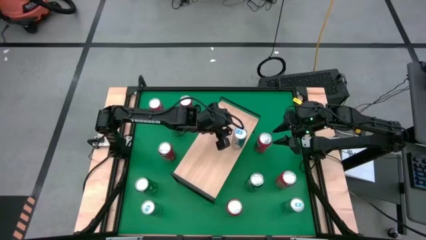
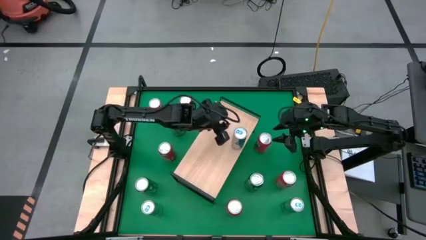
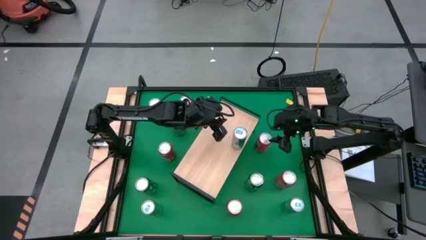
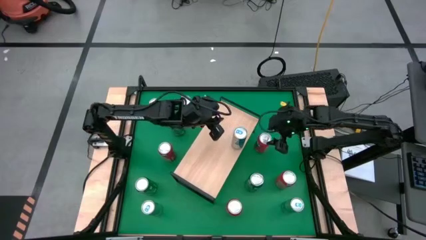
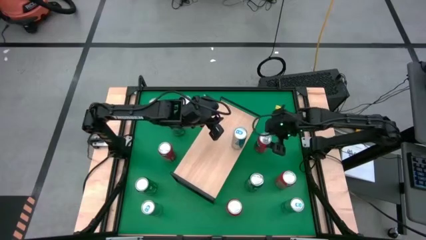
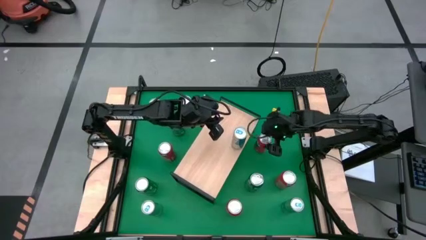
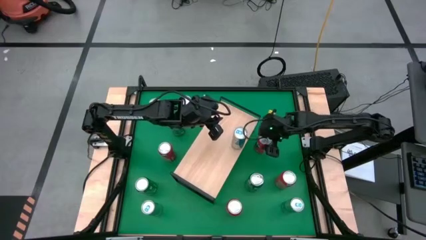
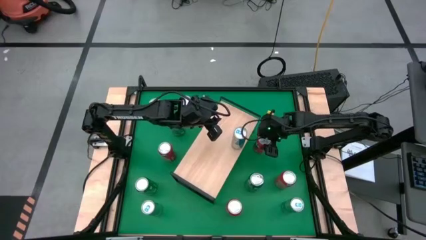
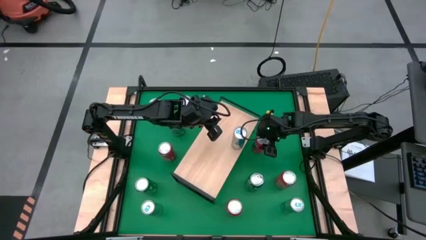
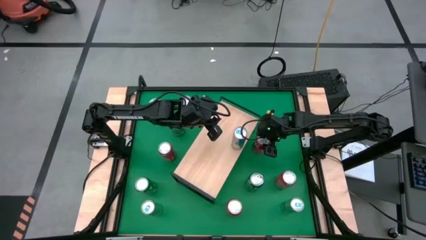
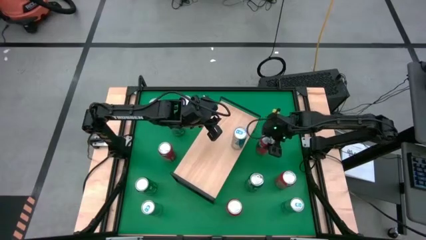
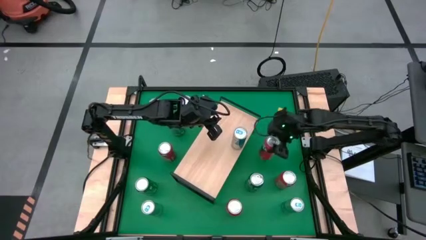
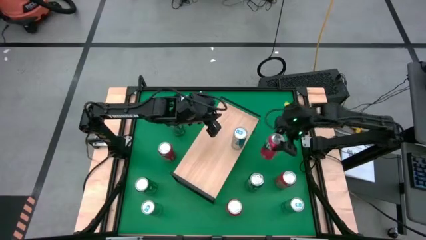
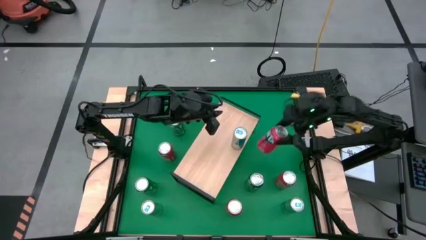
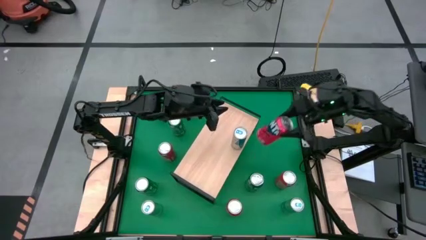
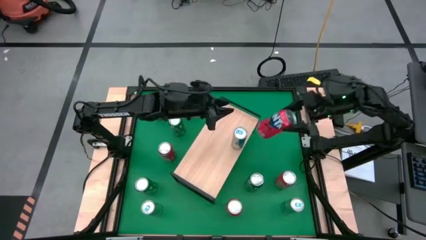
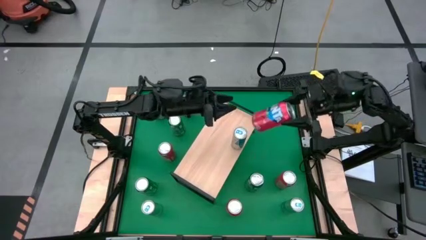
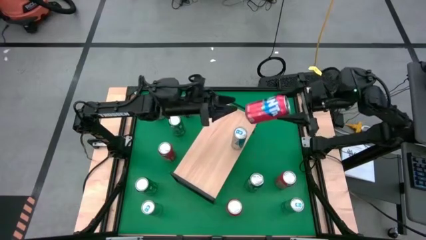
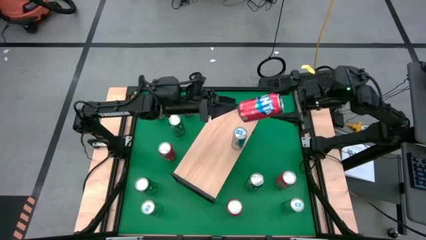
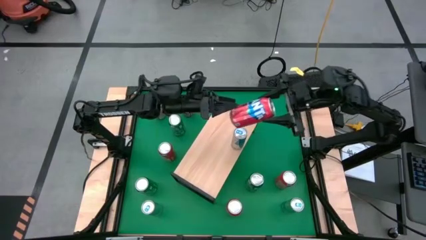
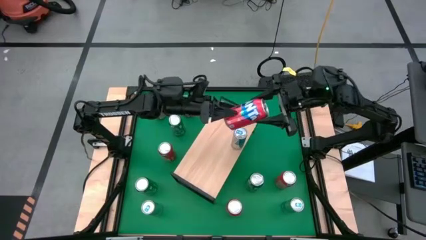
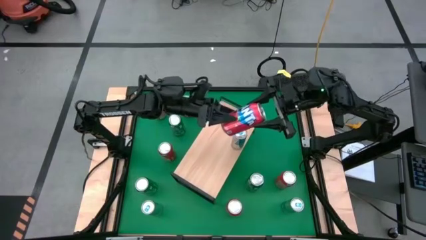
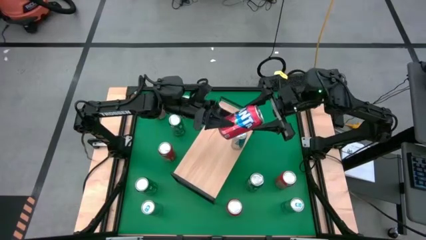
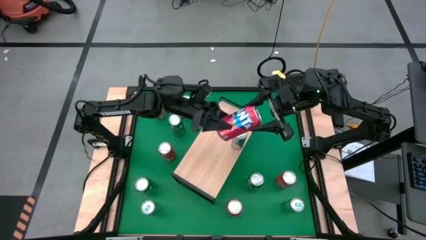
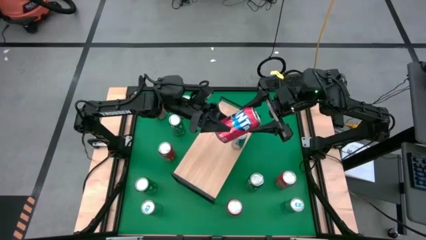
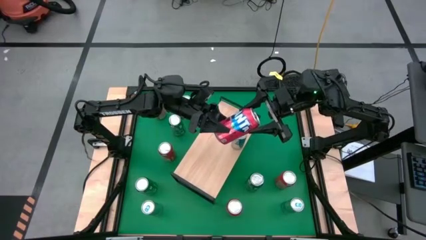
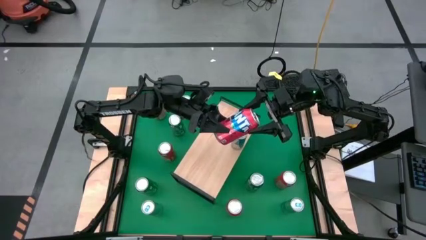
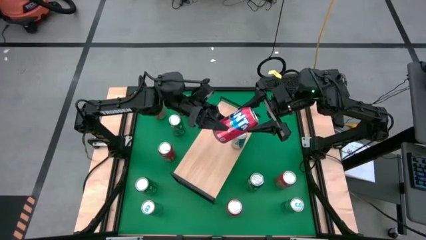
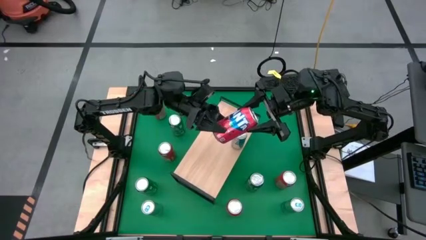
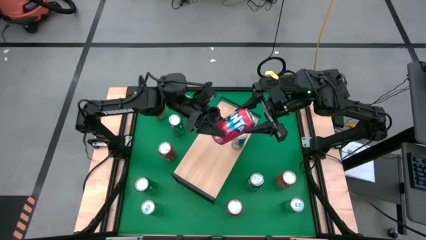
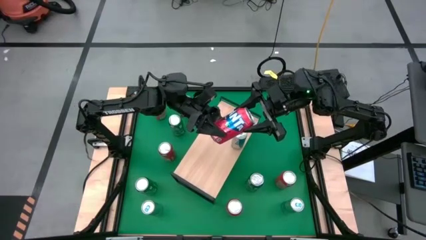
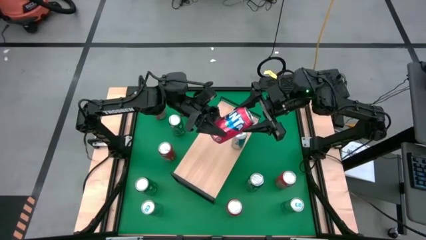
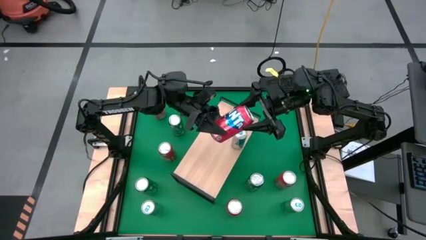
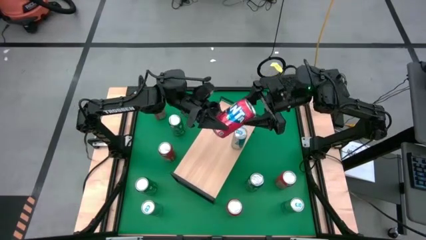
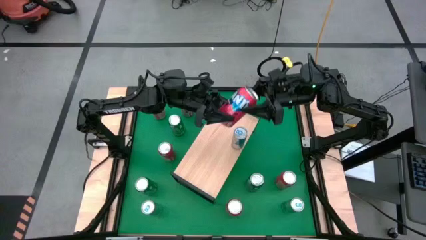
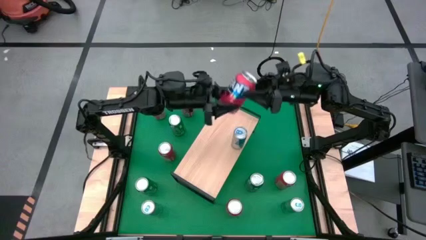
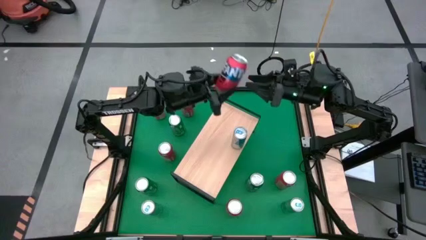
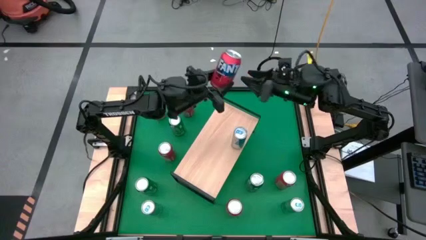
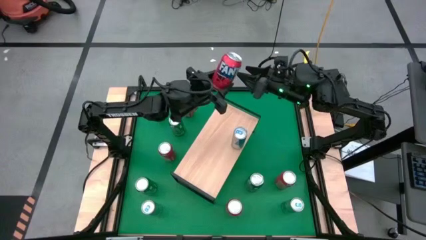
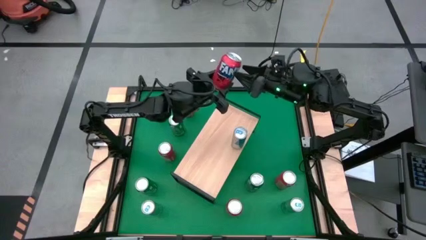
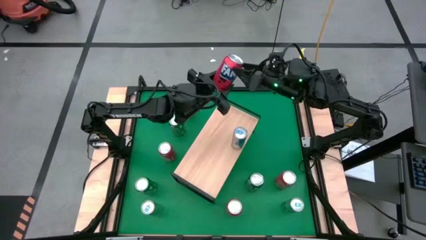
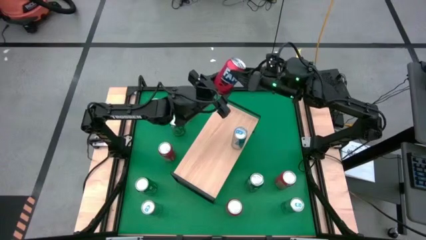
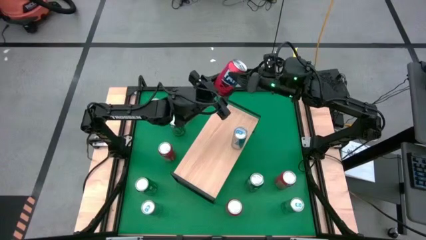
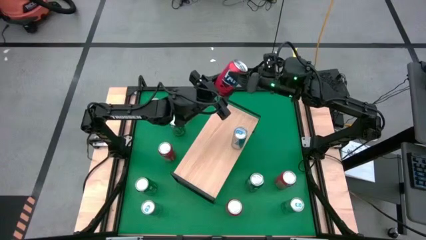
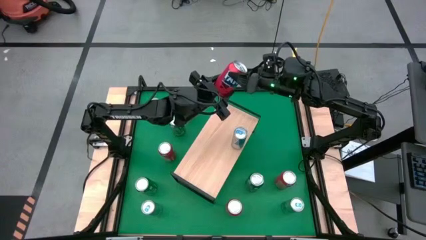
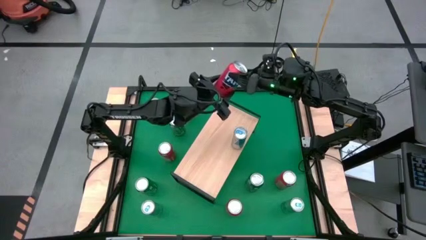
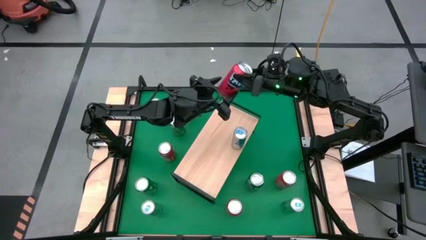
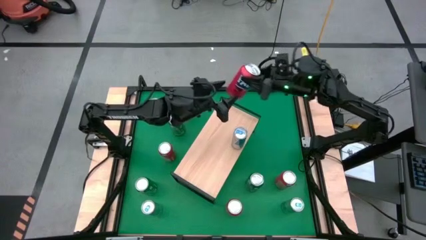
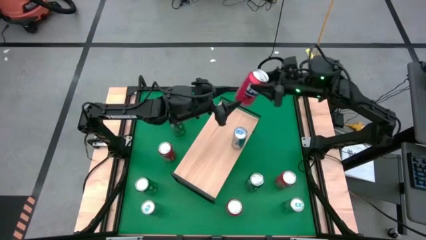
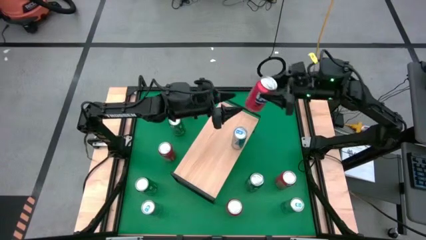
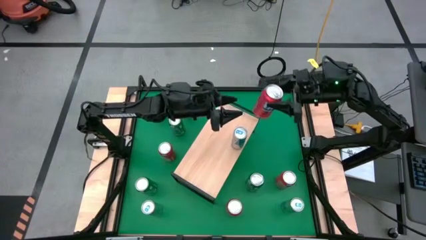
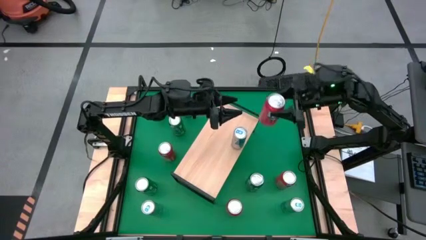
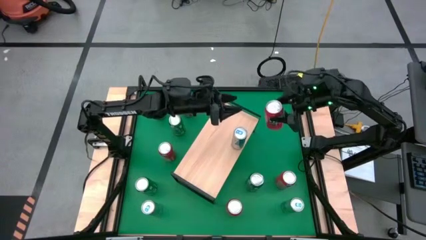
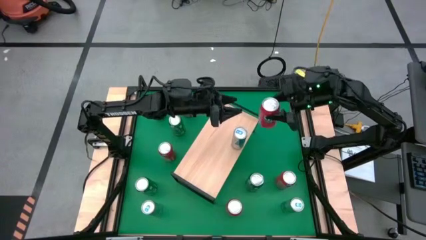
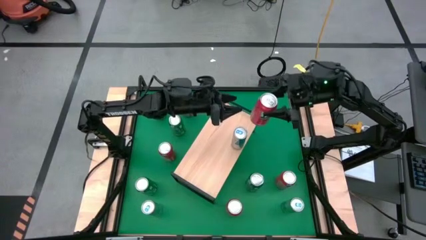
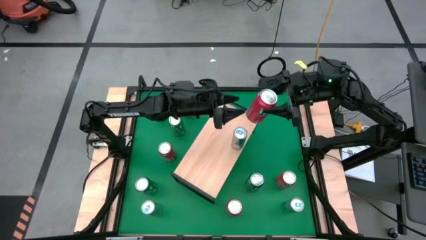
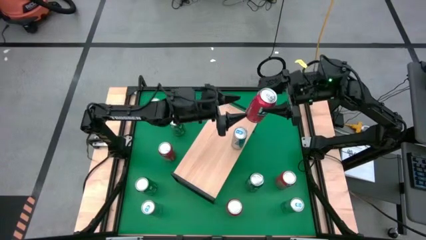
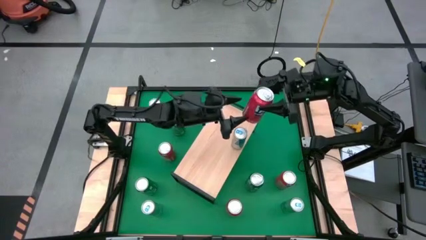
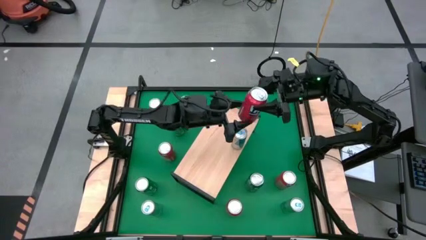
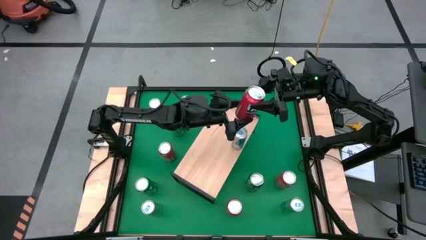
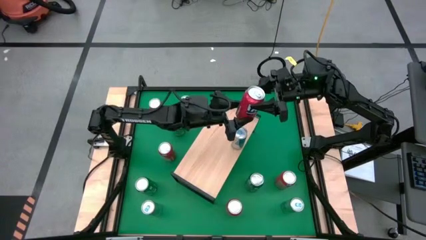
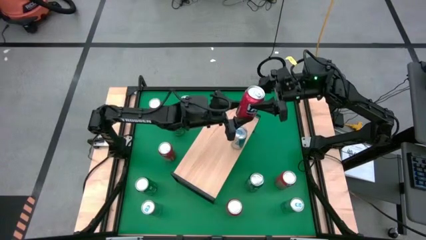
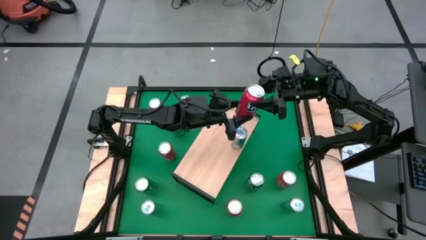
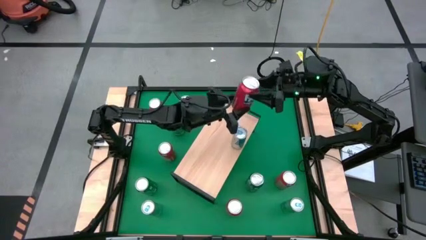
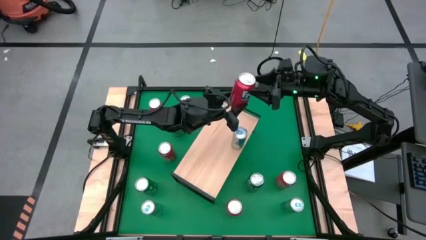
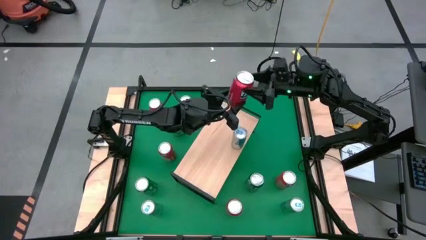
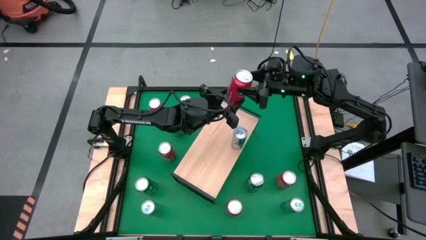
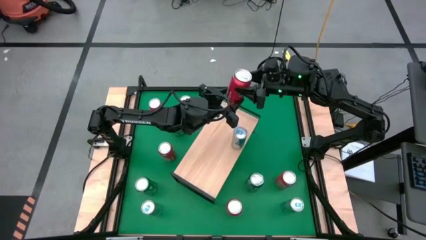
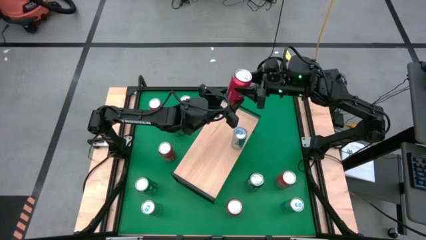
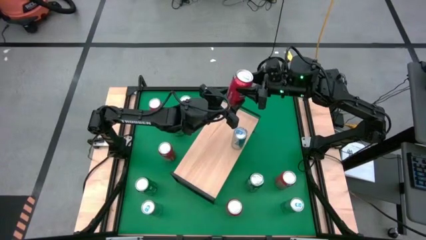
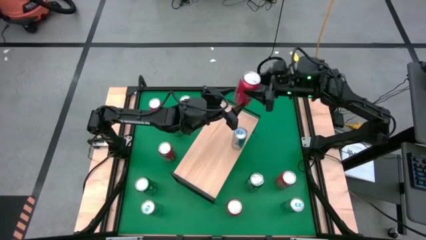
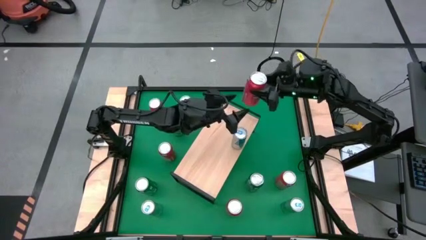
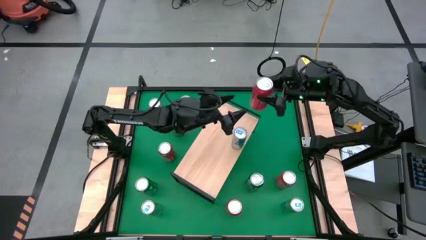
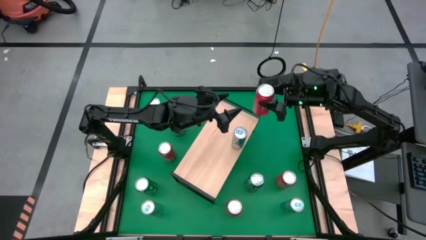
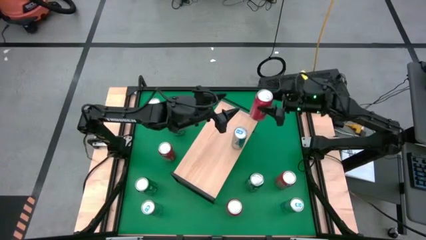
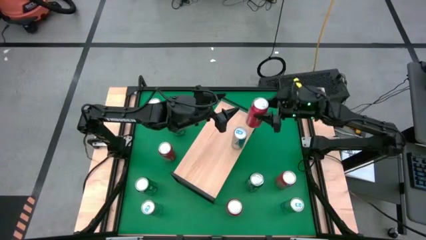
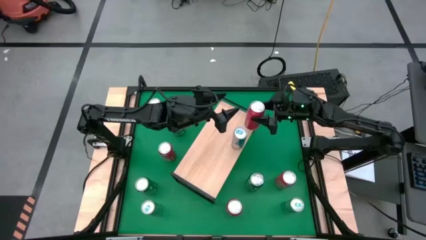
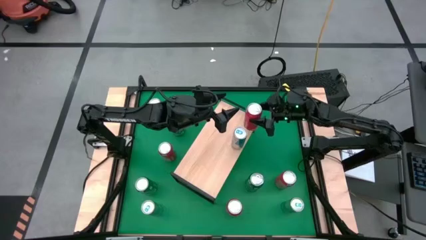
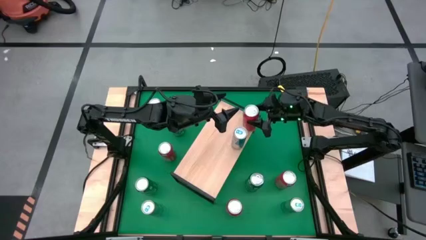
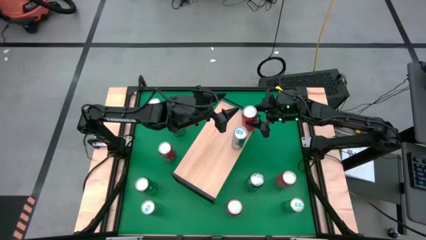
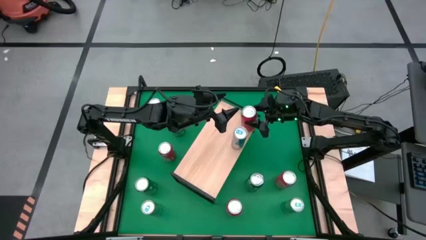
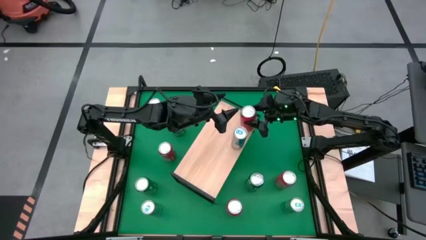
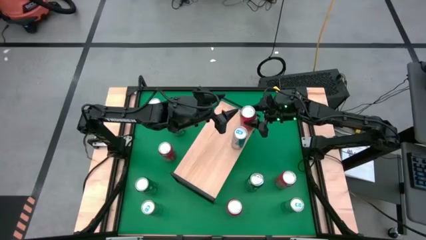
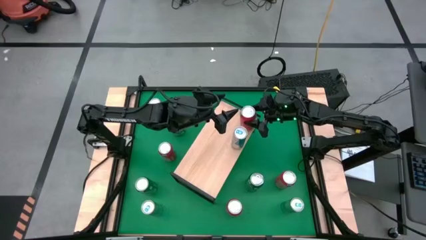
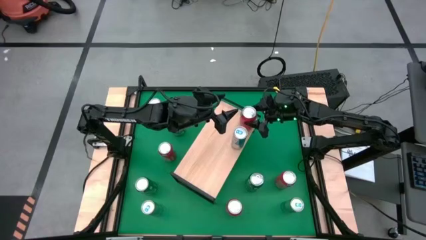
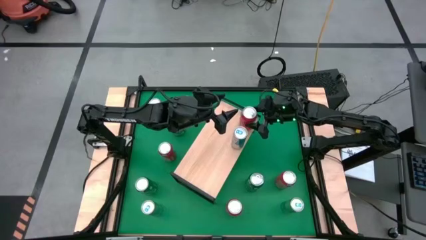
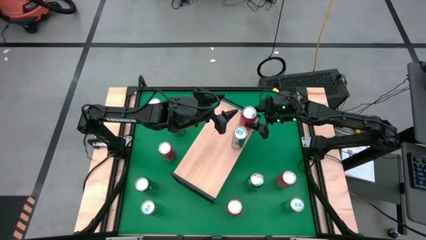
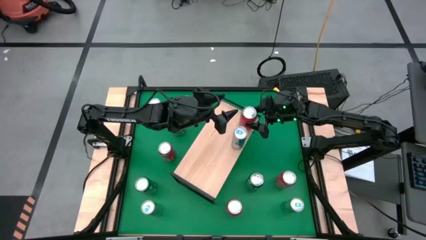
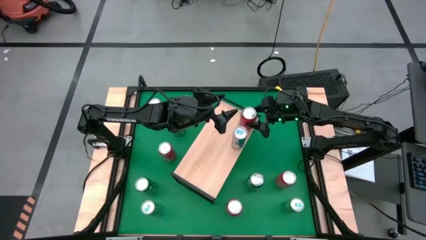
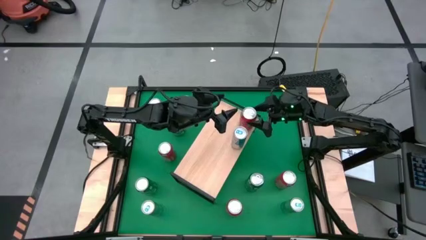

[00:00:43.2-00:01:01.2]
Task: Sort soda cans
Put the red soda can on the shelf
